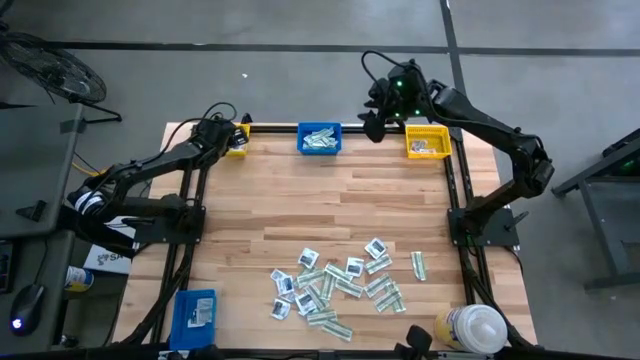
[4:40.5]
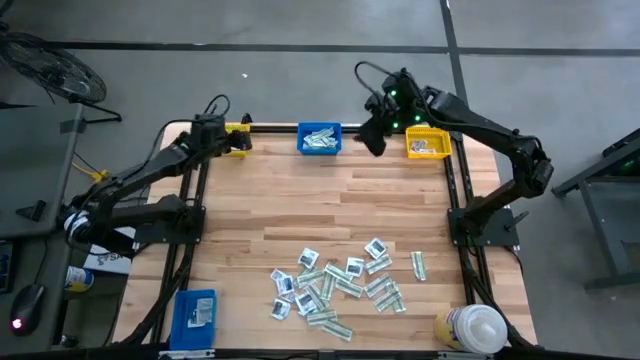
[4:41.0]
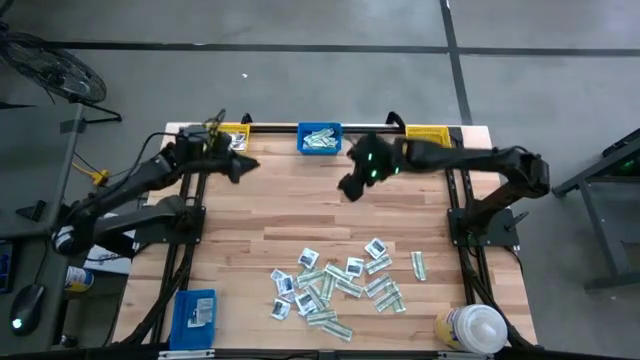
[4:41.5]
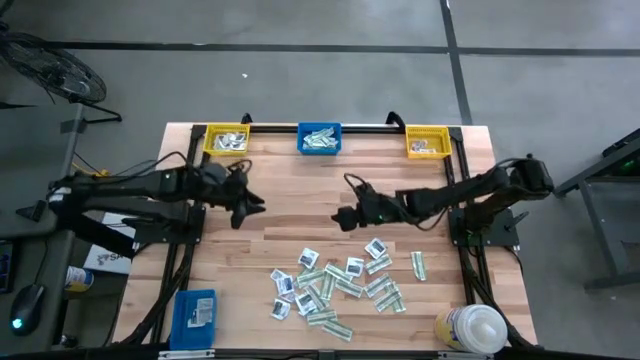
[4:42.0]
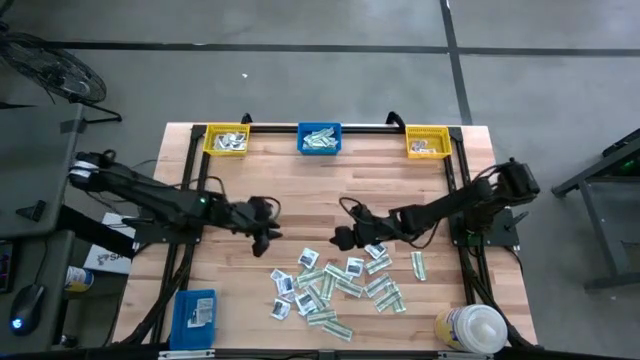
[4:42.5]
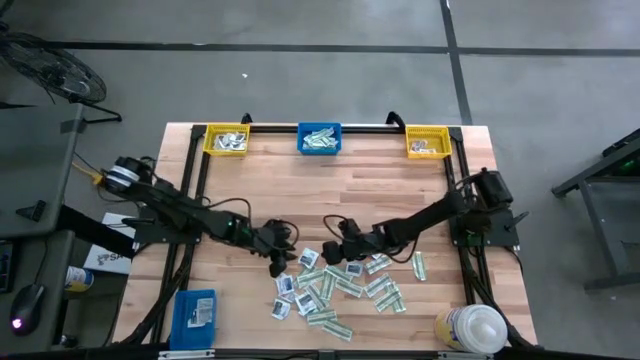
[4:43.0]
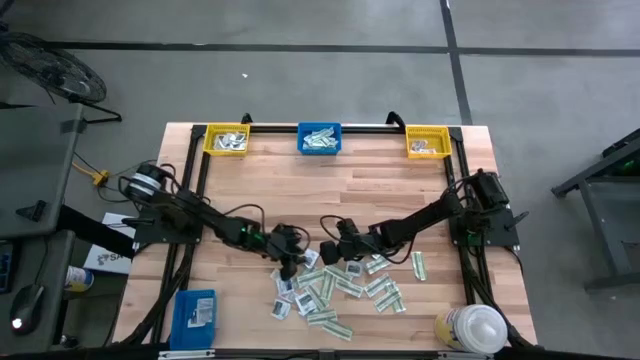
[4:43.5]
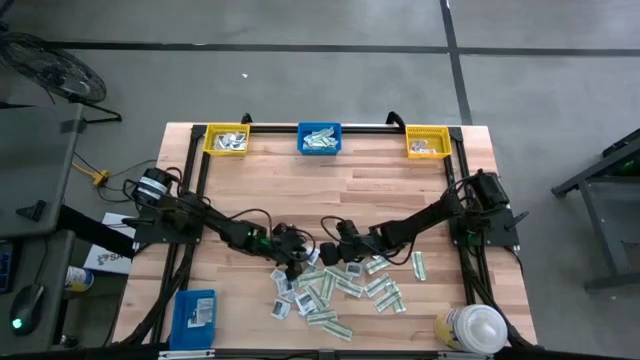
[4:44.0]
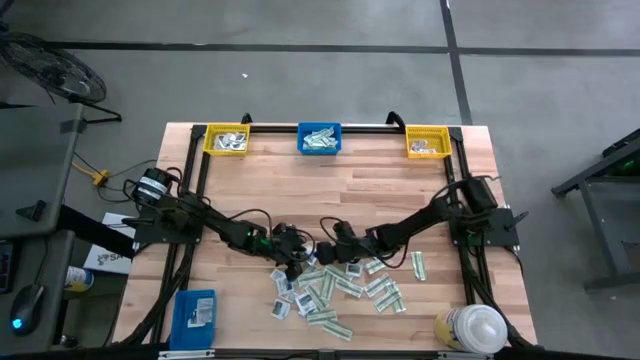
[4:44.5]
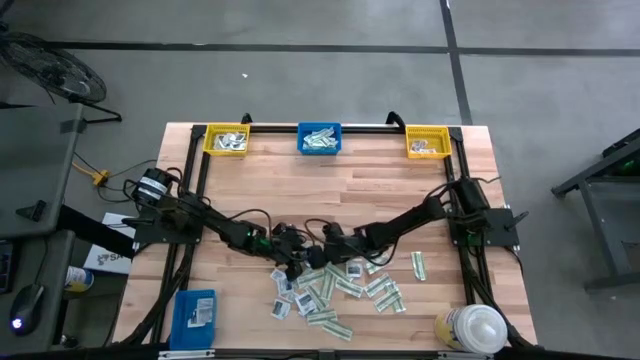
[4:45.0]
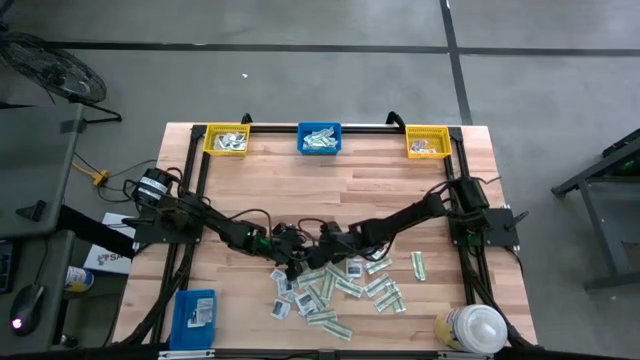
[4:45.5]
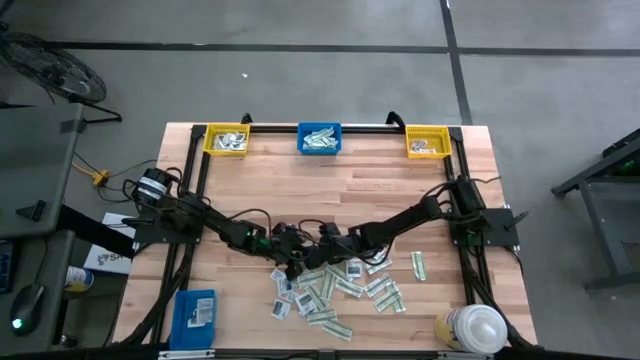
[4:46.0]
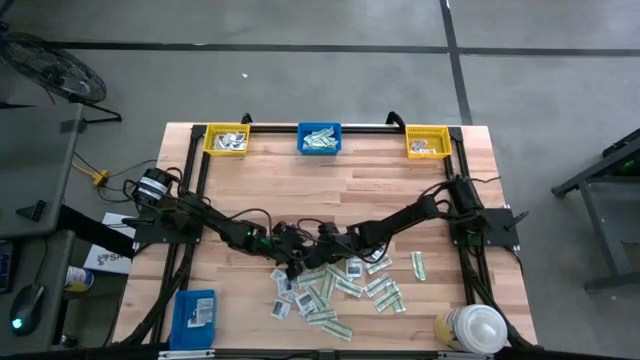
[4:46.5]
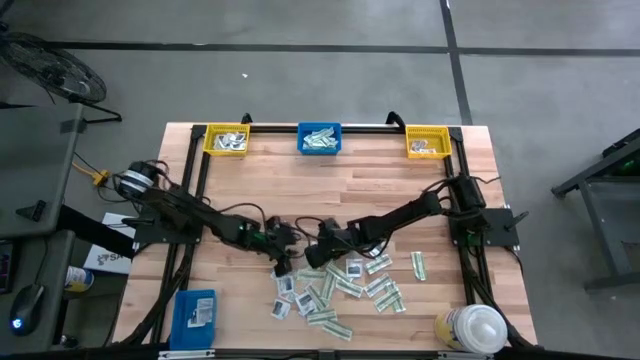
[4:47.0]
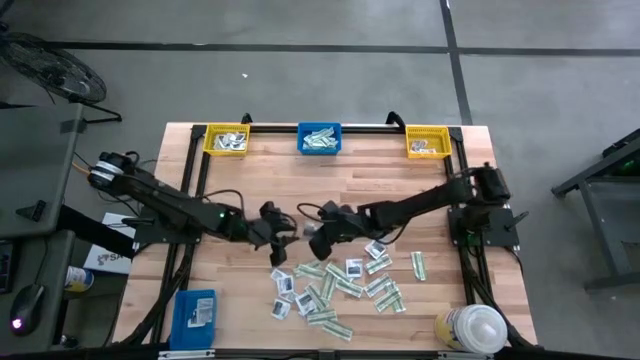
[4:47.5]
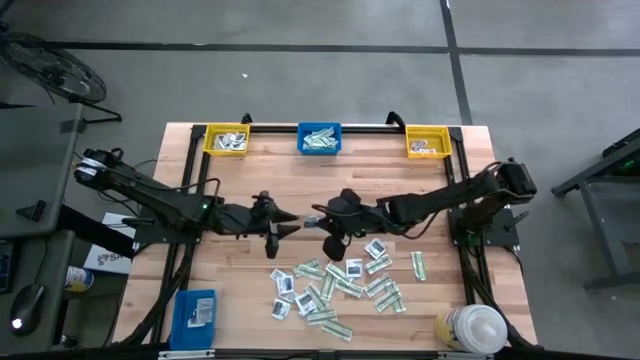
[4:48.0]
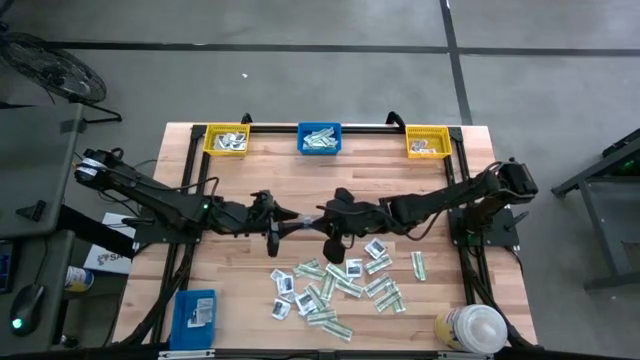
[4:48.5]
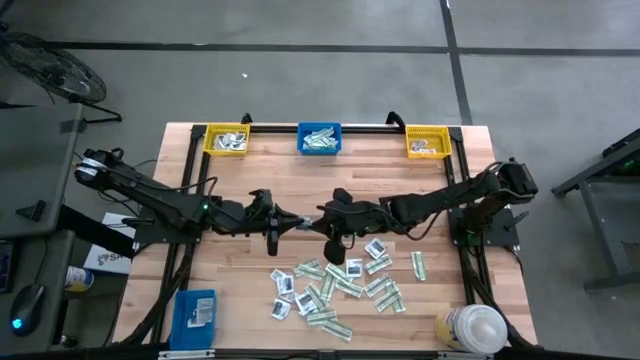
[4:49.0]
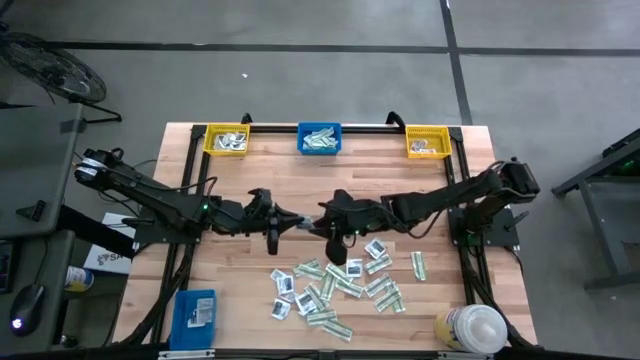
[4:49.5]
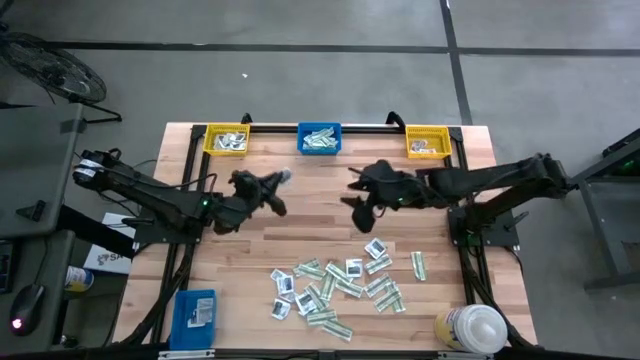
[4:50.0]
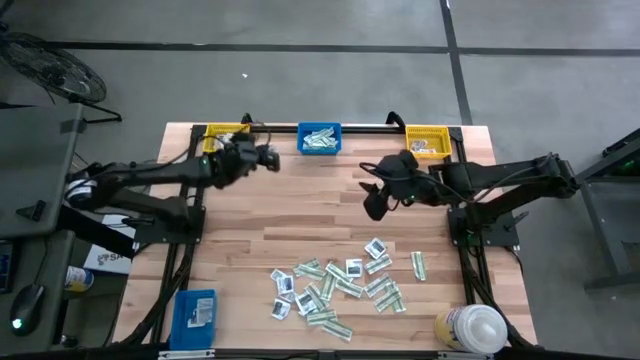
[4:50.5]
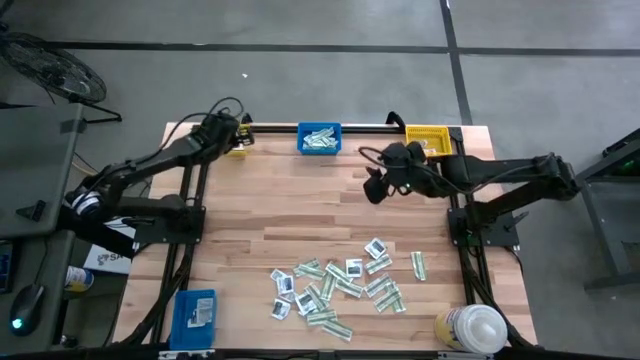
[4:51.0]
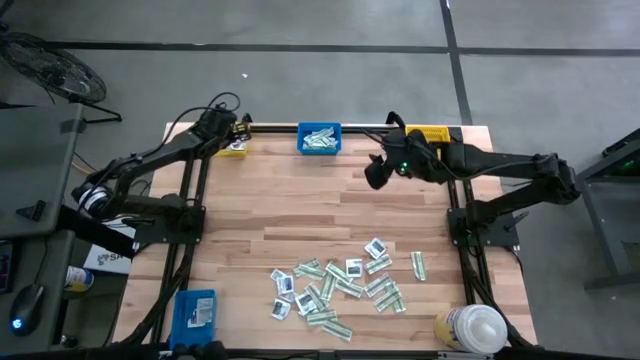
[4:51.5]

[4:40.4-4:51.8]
Task: Pick & Place First Aid Supplies
Put the gray towelette pack into the left yellow bin

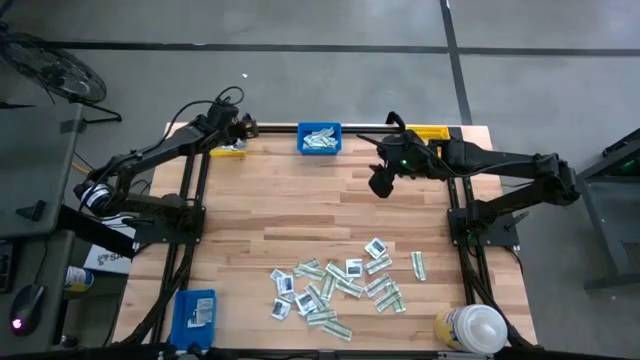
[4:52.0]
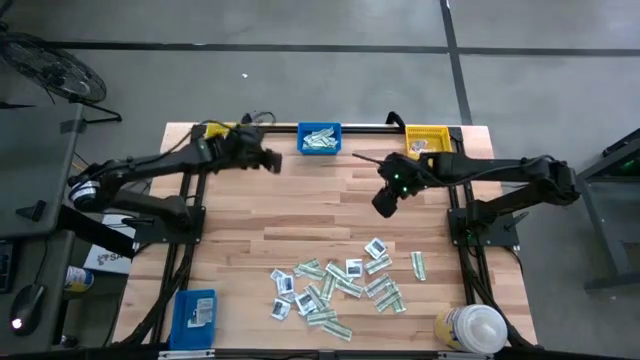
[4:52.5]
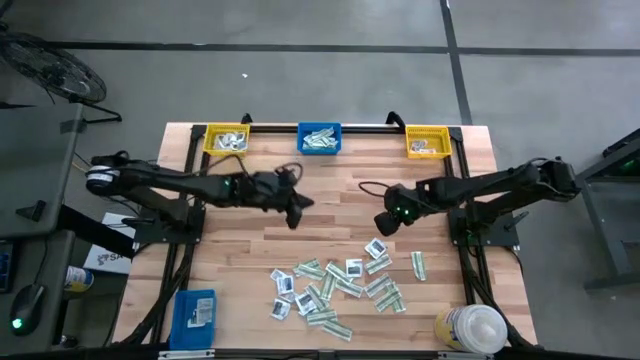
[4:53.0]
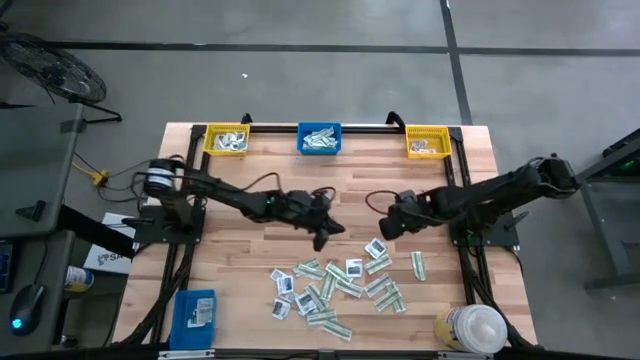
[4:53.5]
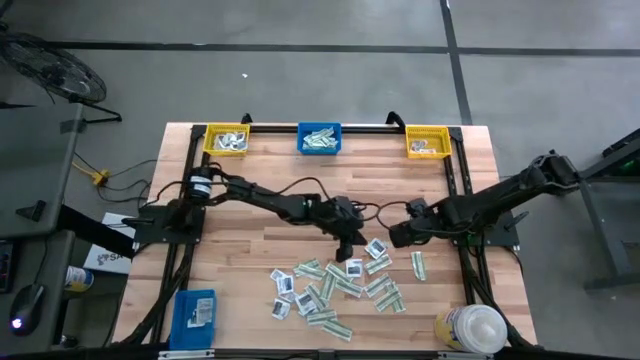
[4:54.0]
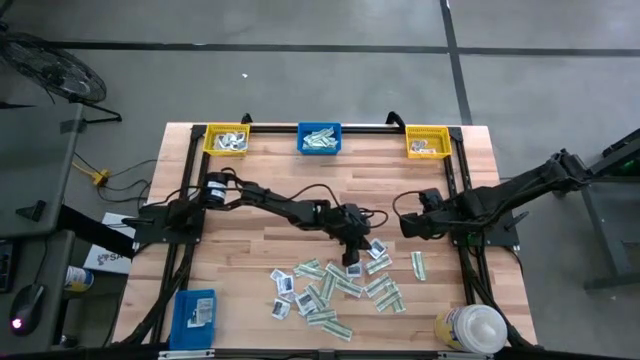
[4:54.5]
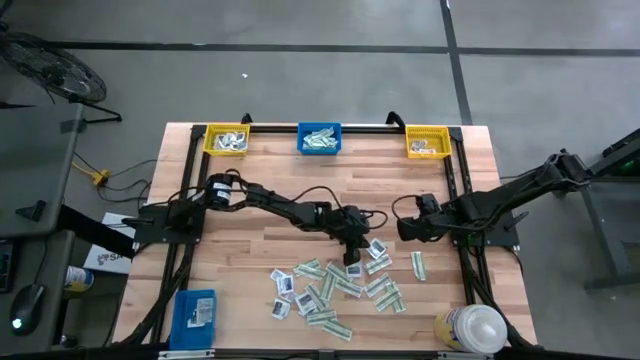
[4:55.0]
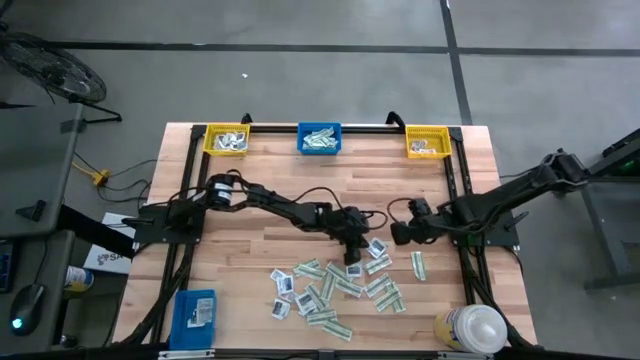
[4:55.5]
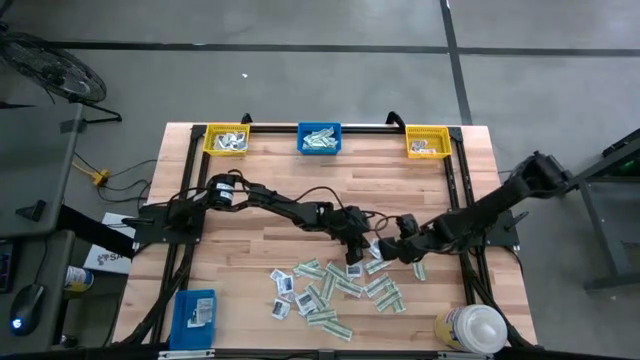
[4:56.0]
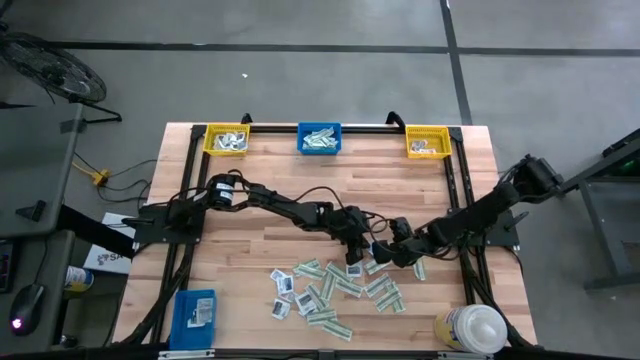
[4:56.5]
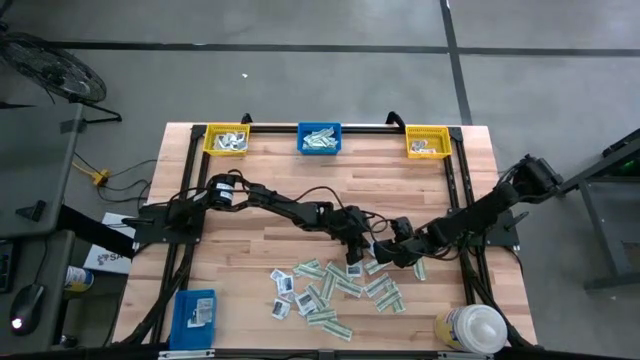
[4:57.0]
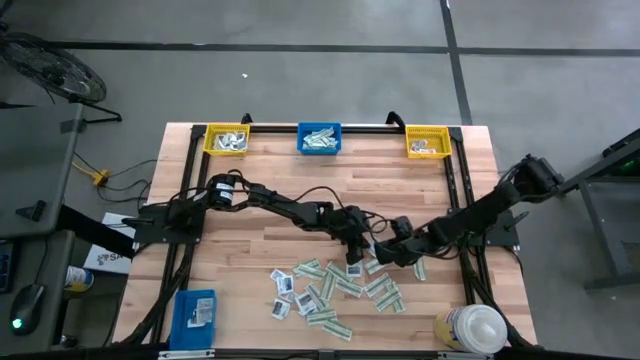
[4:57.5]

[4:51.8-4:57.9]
Put the gray towelette pack into the left yellow bin

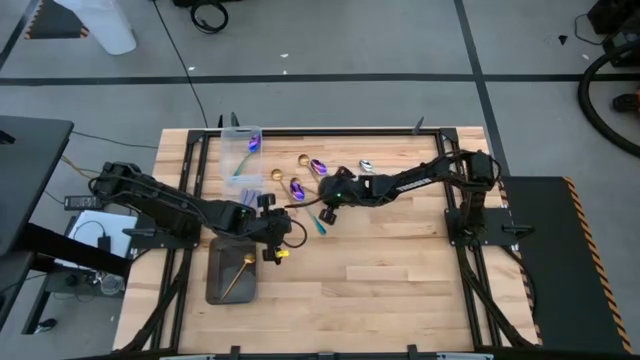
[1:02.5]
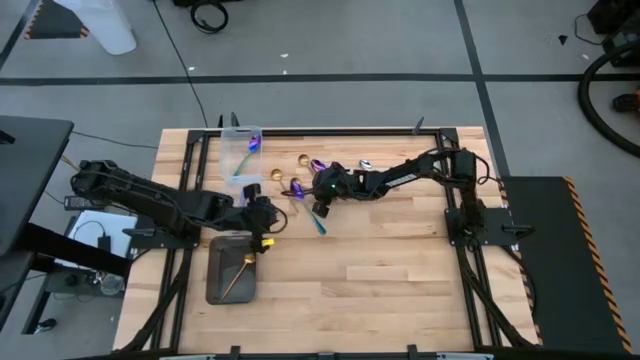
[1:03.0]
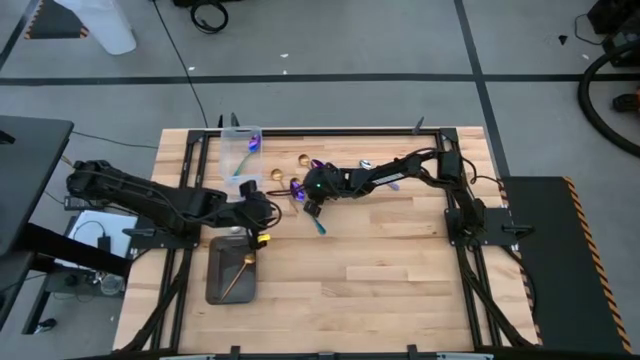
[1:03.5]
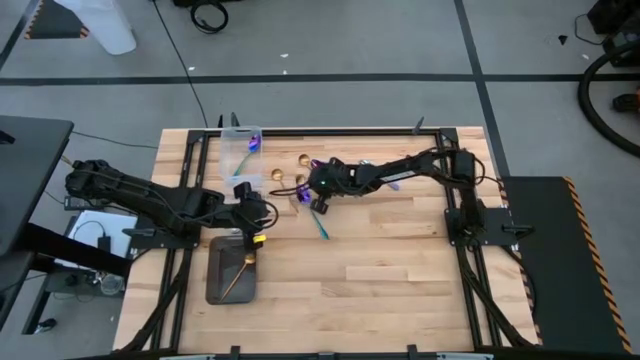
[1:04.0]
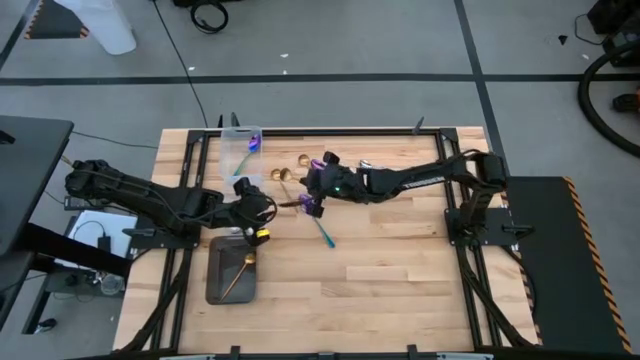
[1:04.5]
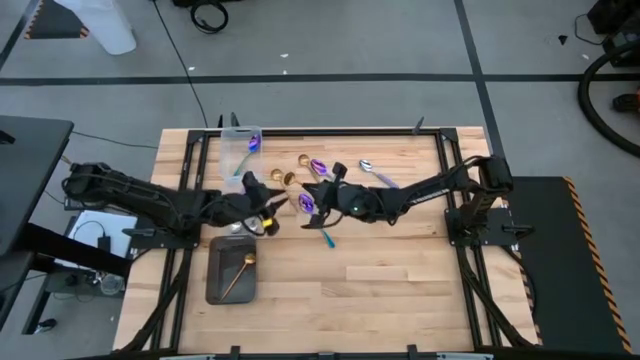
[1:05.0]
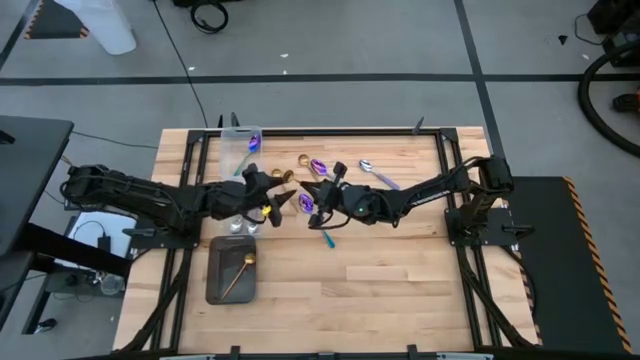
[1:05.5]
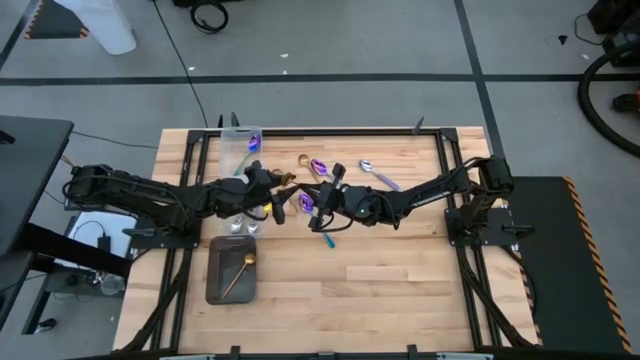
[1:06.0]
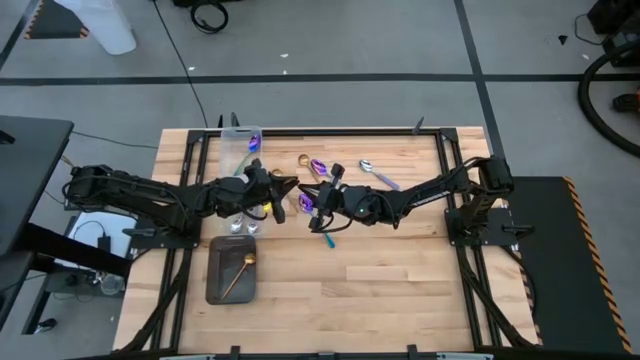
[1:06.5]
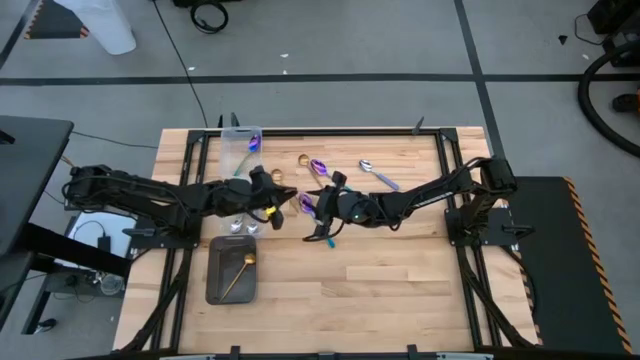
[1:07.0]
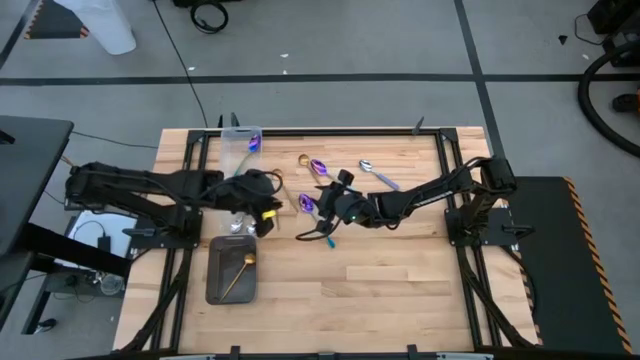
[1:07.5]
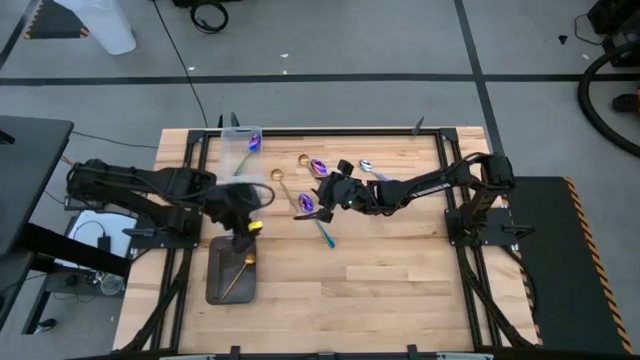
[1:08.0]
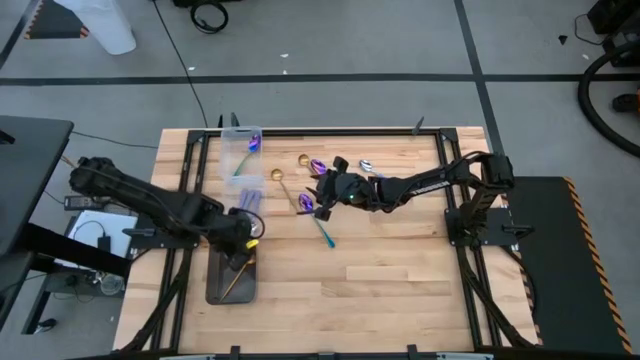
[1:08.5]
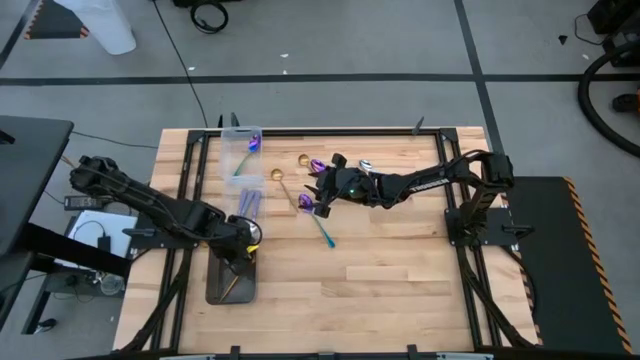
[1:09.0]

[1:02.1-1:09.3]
Task: Sort silverware by color (type)
Put the gold spoon into the black bin
